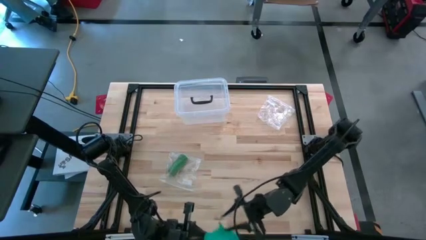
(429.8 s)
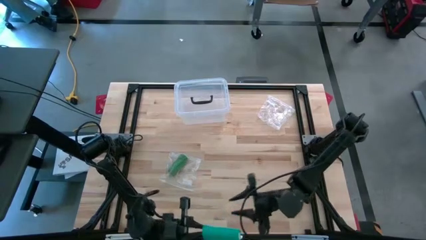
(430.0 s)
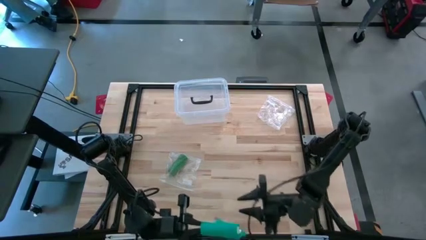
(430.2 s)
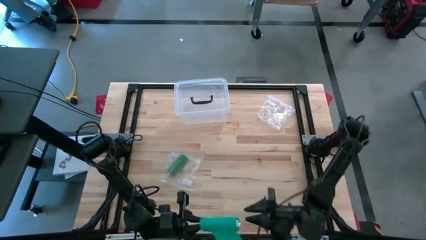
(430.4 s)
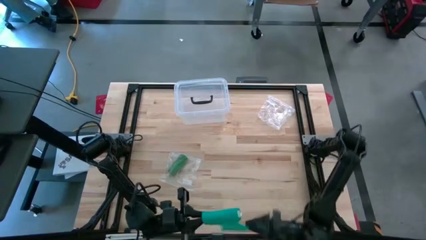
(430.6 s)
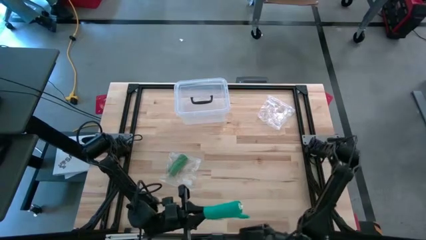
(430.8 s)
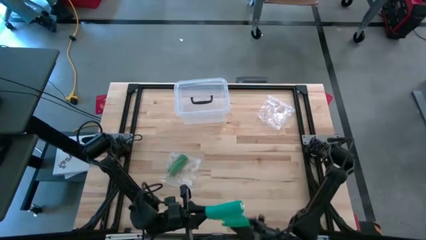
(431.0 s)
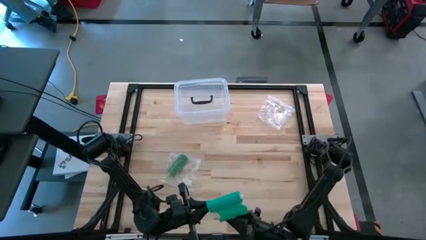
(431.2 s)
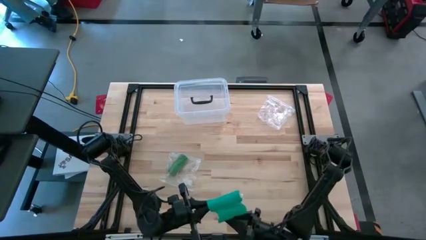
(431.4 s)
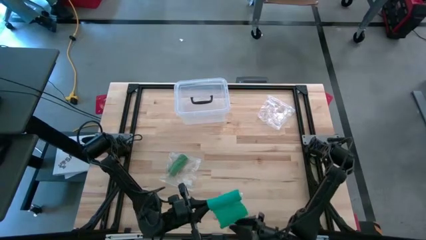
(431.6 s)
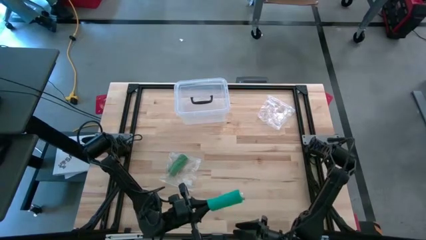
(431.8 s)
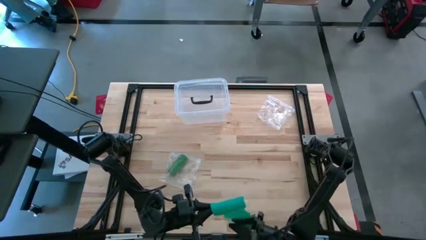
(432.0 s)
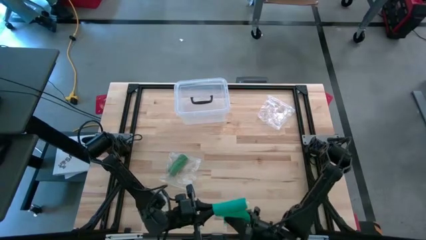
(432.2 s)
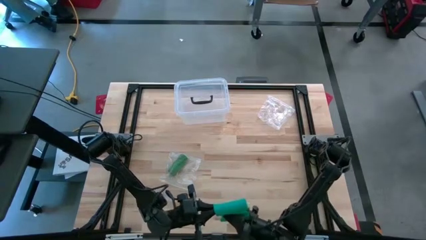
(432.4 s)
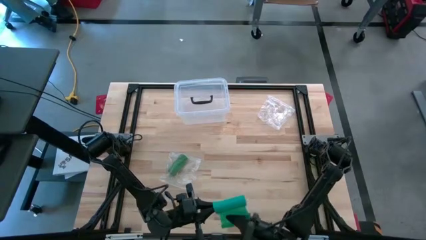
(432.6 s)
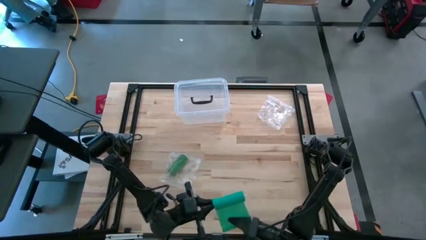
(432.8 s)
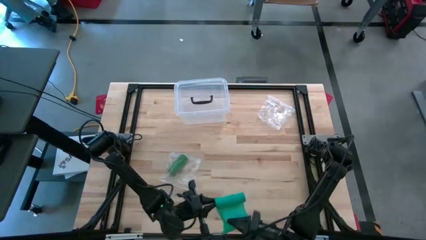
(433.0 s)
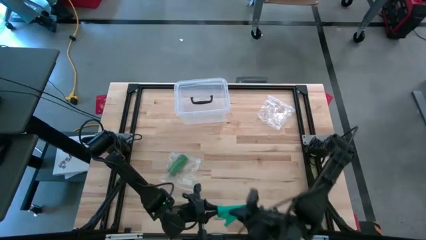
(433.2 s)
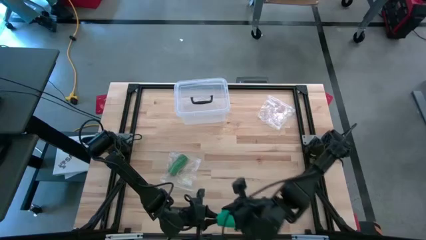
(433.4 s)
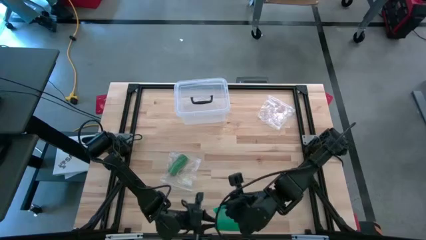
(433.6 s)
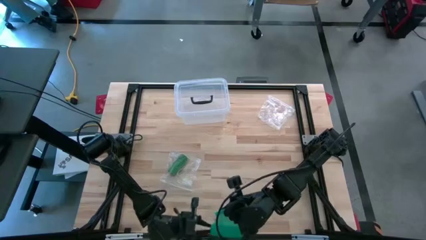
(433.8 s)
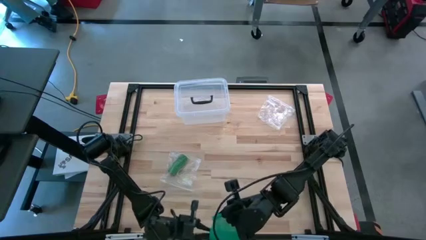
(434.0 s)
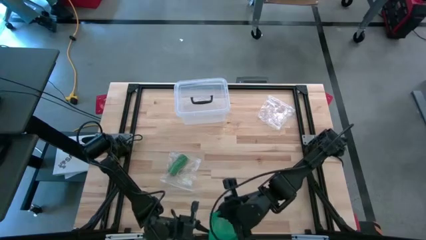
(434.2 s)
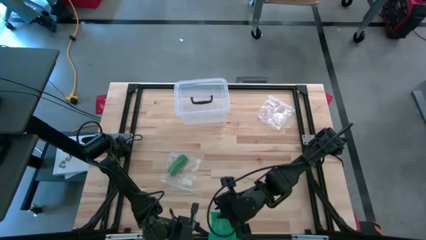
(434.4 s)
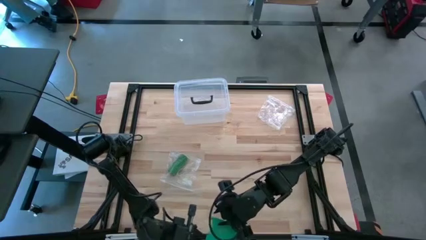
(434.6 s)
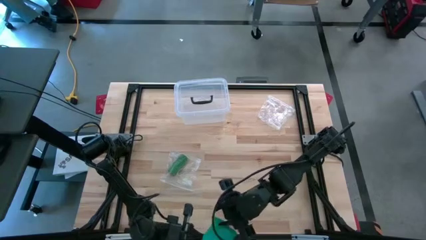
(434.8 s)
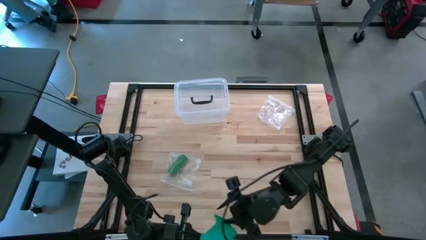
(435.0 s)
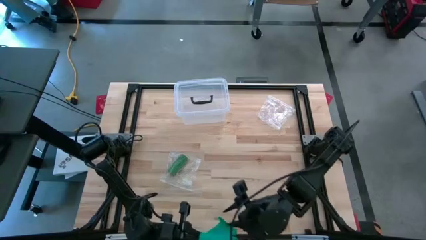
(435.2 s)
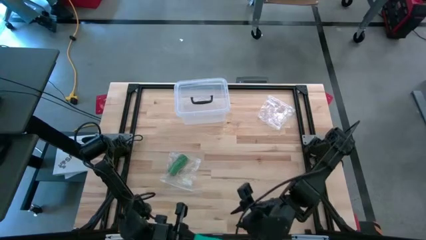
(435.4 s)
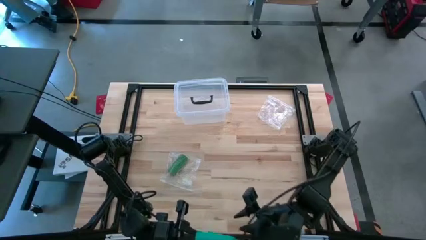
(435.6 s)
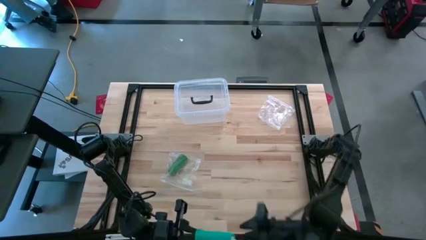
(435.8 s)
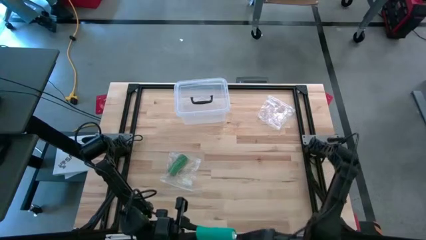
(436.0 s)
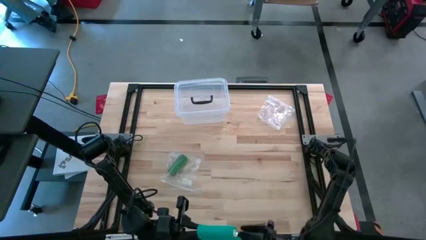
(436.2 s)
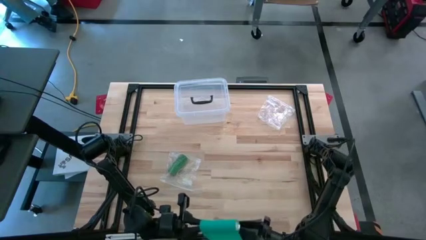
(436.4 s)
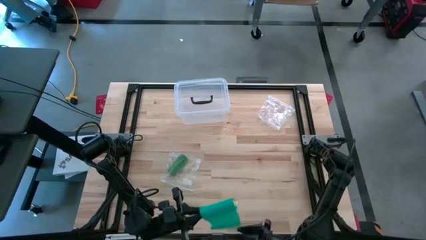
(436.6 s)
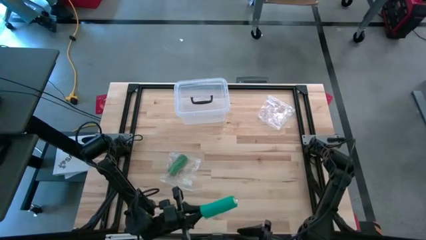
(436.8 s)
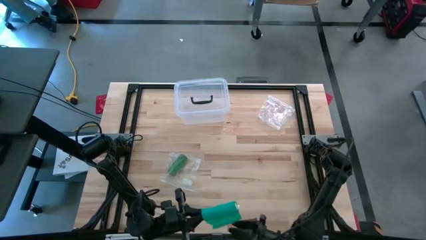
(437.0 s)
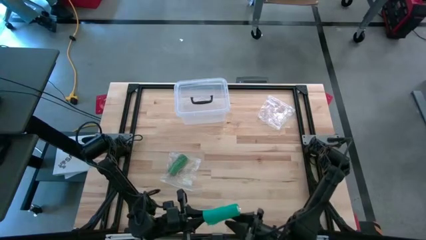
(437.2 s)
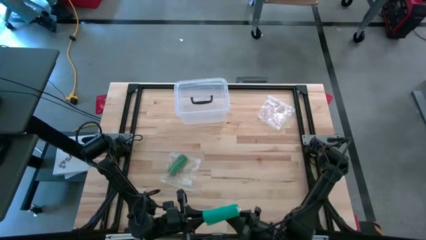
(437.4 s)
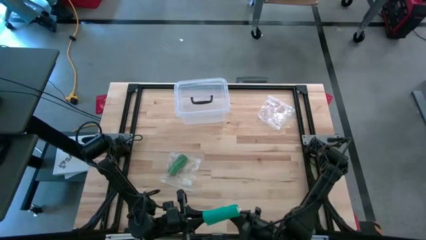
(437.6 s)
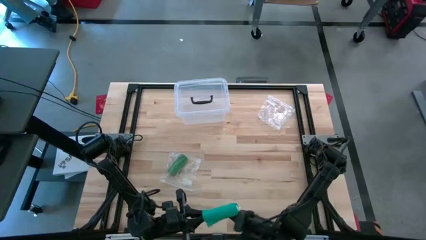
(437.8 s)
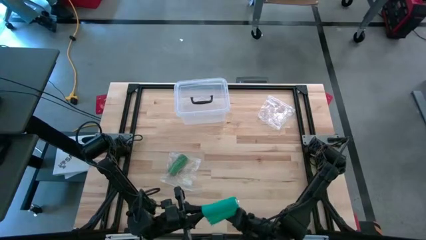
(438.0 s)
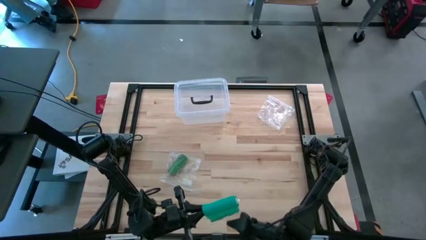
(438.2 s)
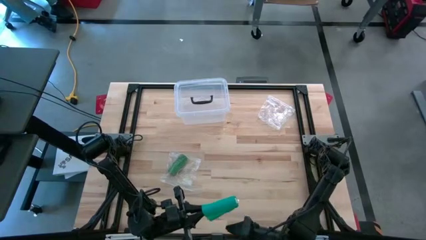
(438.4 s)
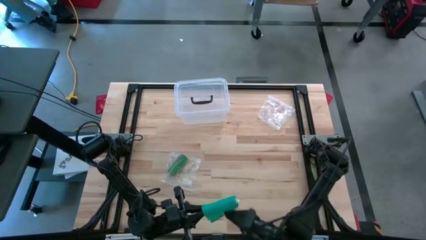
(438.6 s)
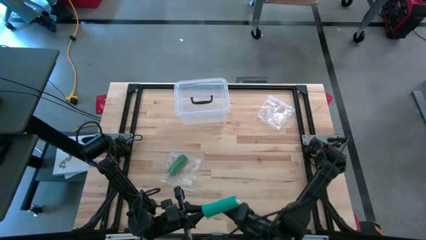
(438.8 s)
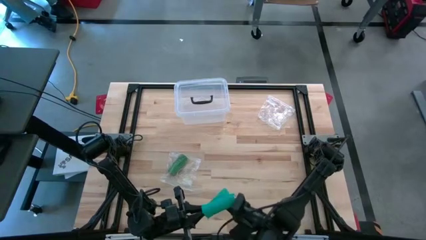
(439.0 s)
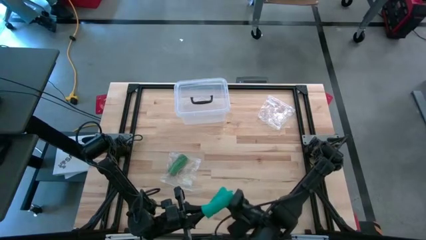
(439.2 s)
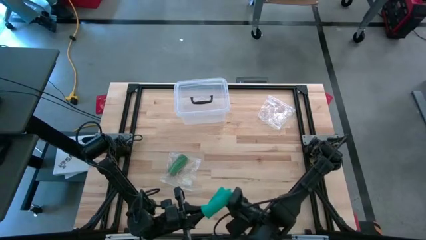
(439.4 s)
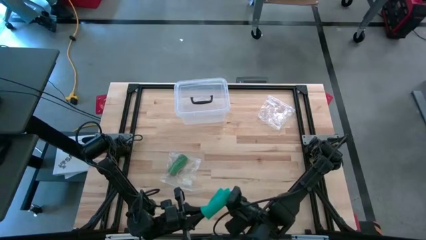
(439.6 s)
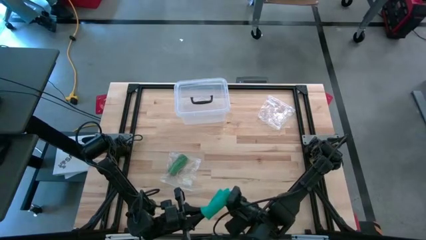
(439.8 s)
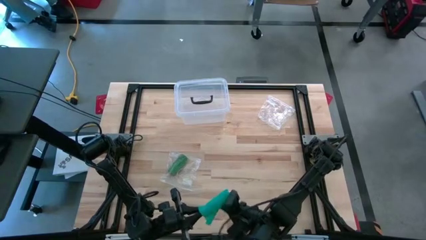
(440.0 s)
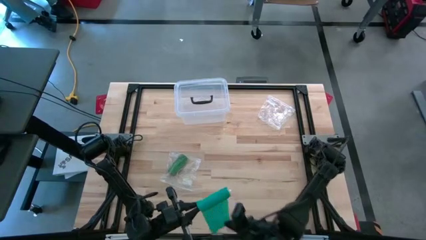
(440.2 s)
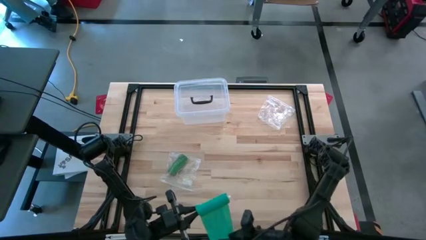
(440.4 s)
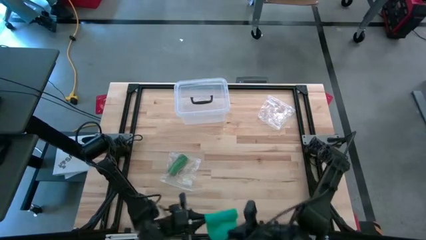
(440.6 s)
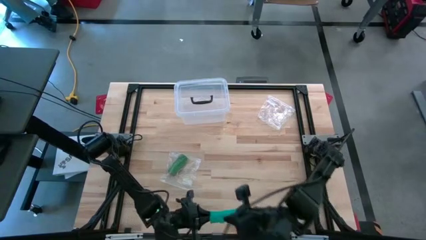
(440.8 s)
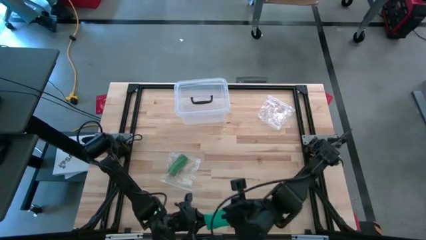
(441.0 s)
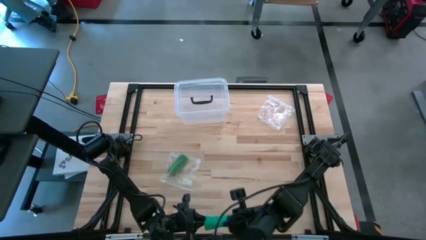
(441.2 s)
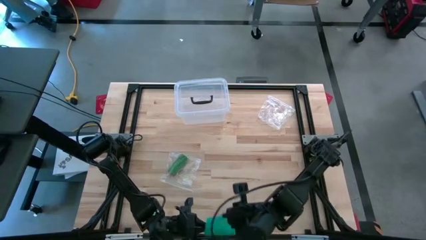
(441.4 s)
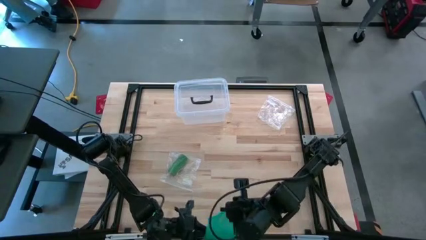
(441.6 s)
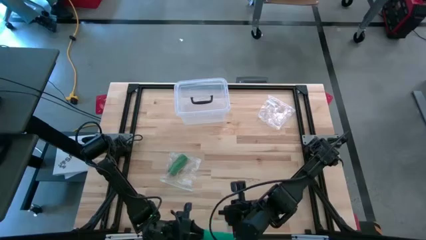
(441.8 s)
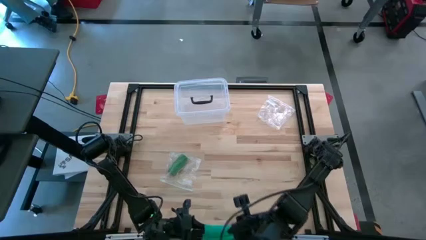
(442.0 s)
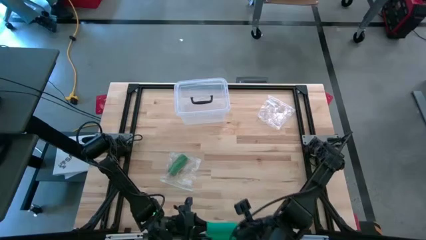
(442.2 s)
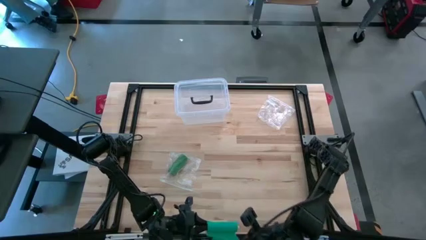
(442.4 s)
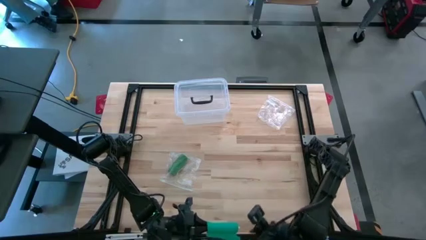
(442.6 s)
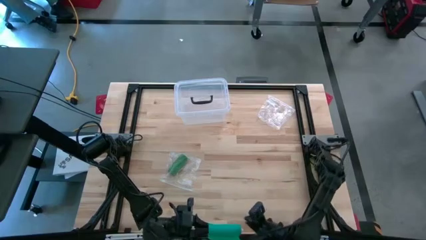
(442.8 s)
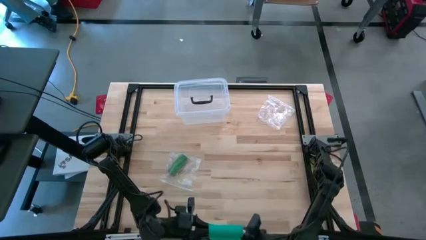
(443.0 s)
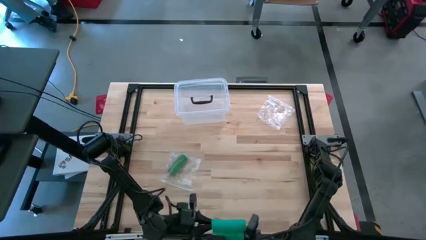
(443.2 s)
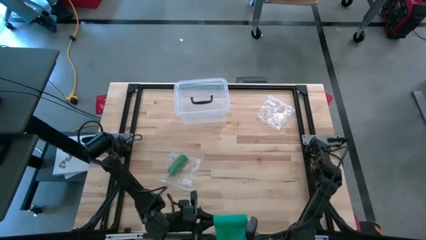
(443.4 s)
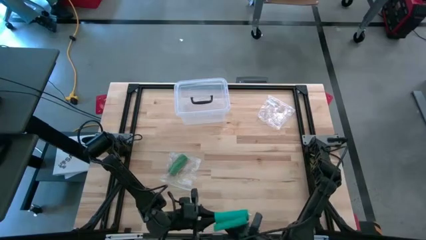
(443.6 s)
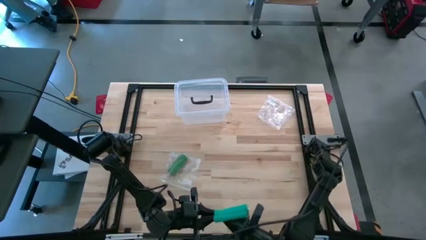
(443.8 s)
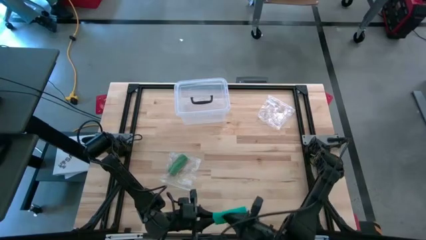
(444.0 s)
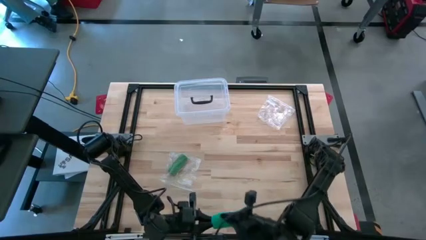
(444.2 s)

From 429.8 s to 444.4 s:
Task: Roll bandage
Roll the dark green bandage
